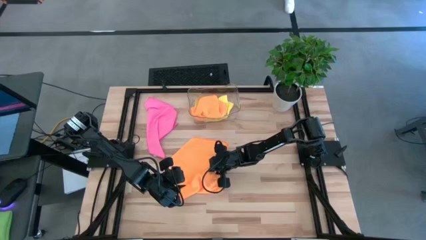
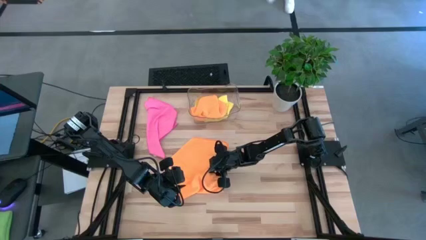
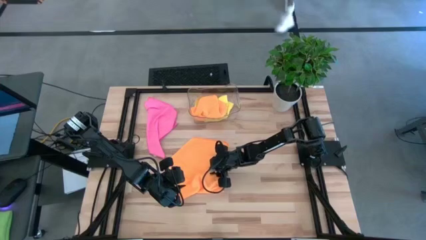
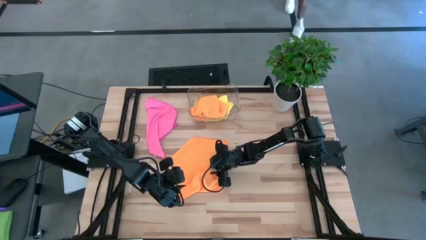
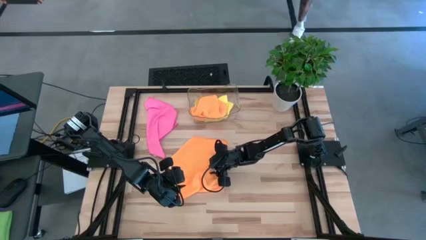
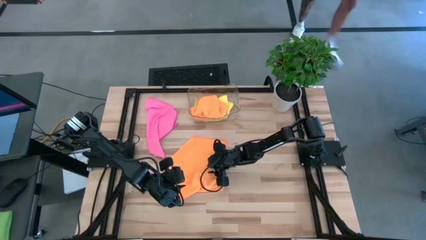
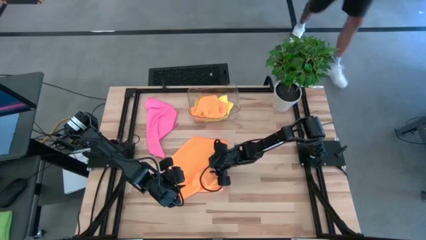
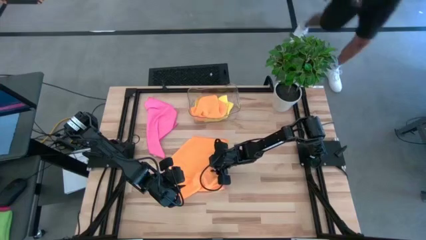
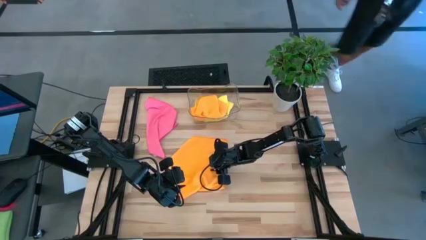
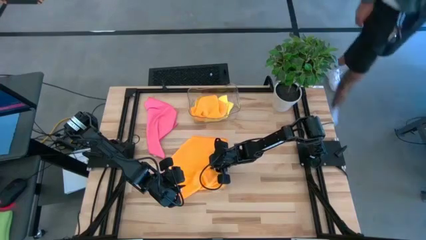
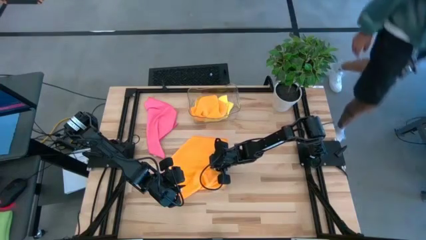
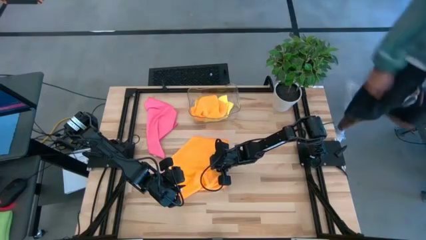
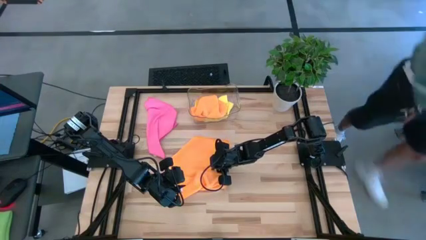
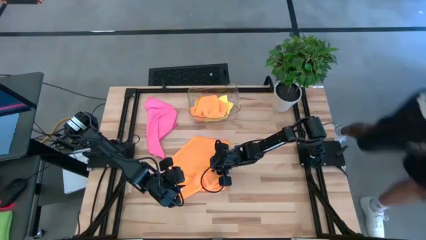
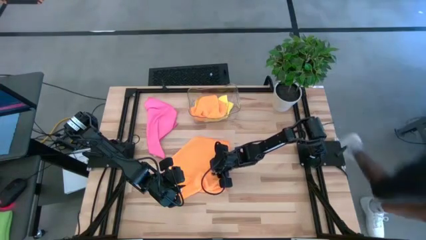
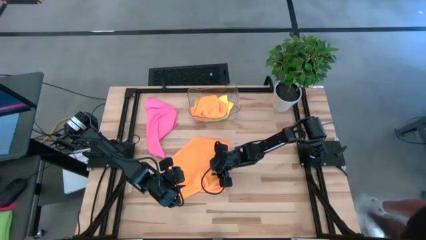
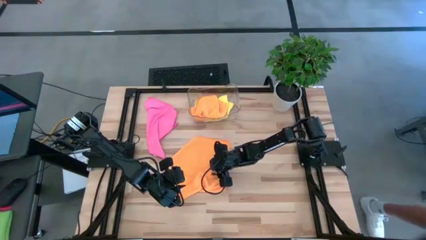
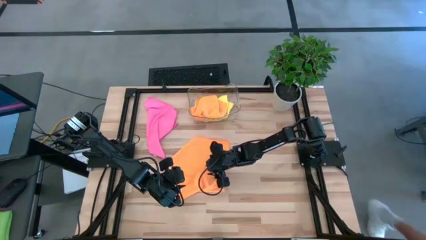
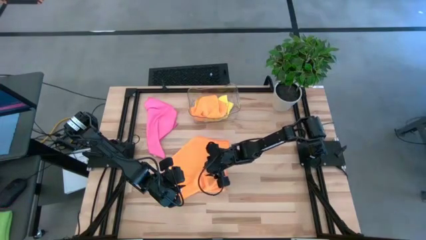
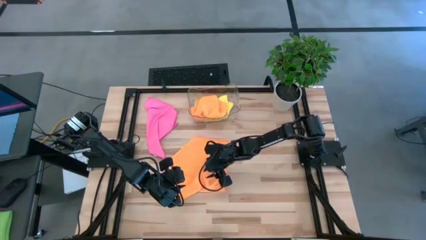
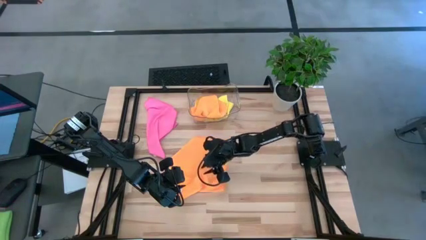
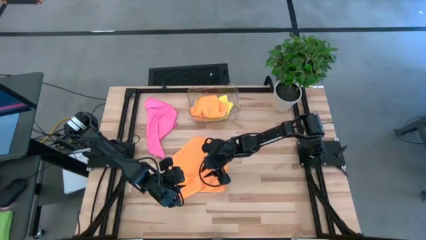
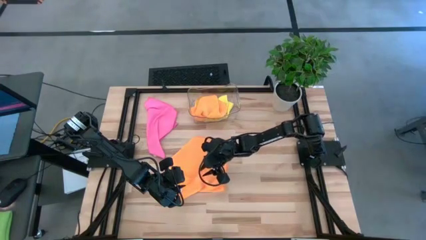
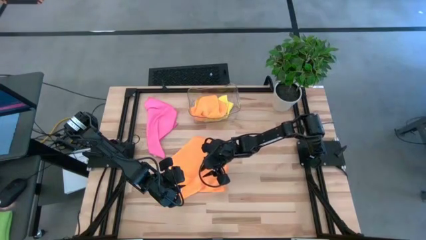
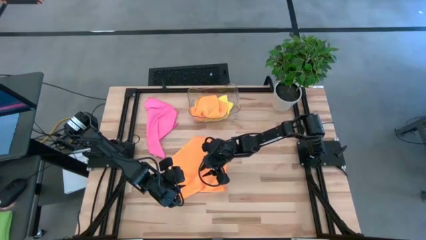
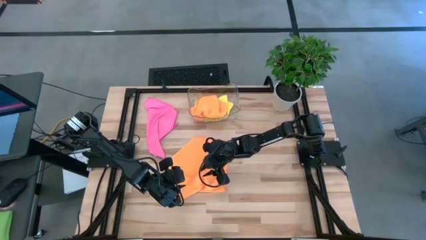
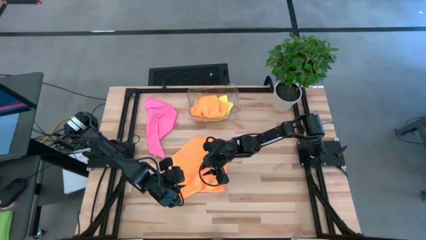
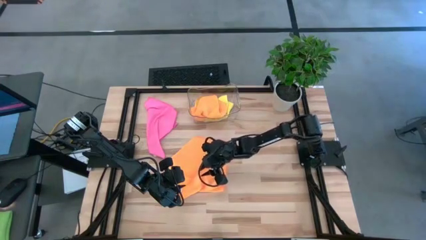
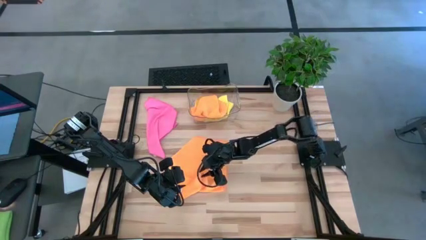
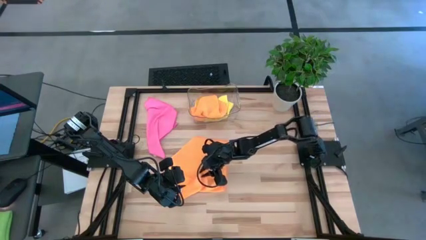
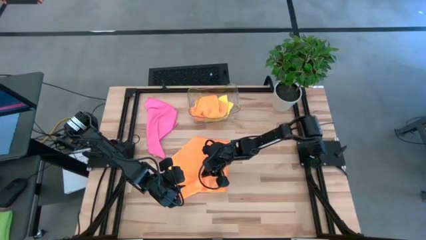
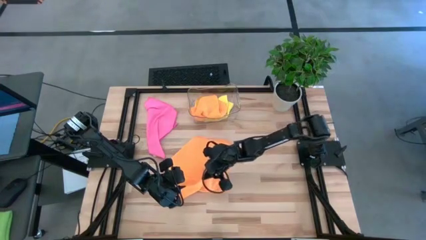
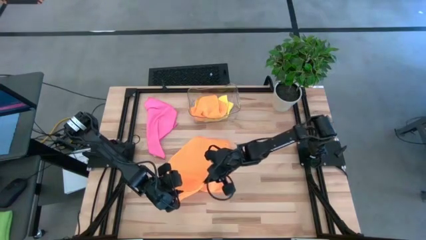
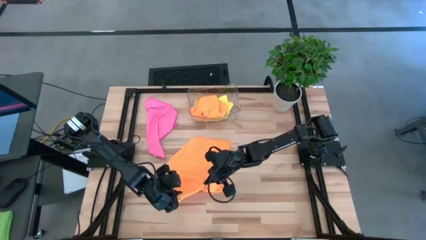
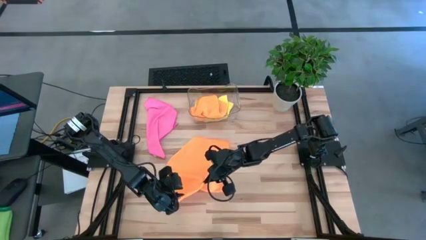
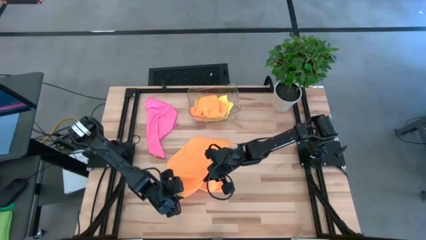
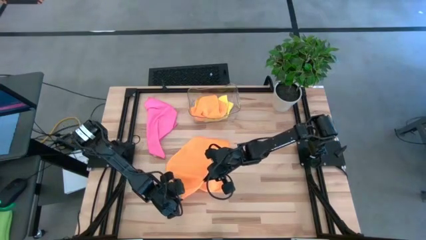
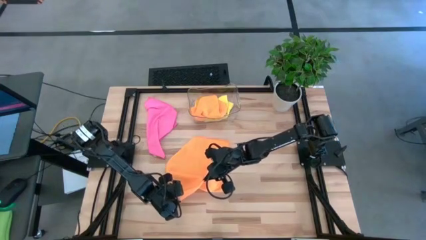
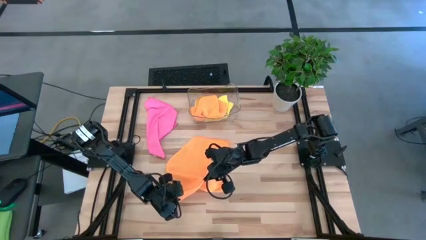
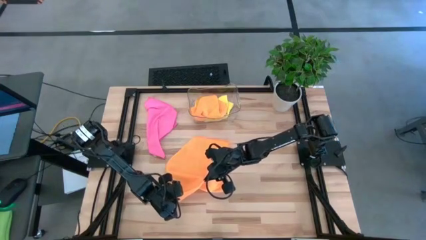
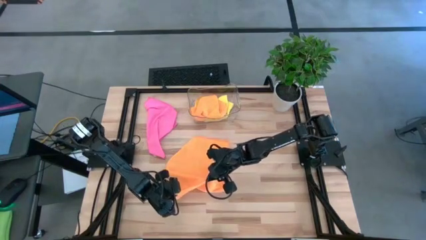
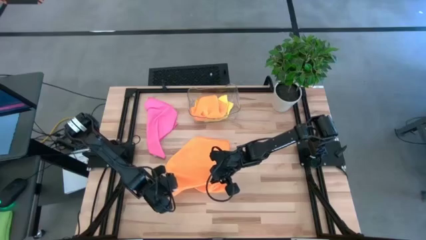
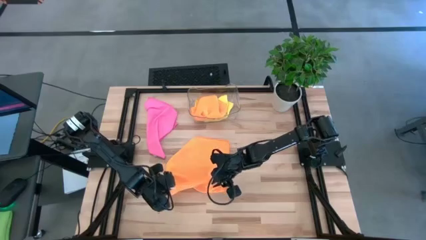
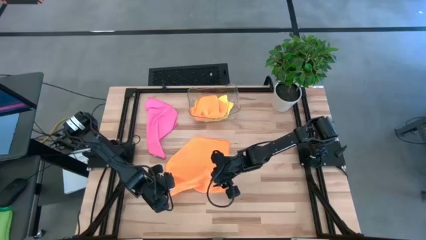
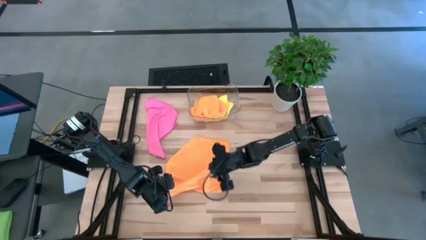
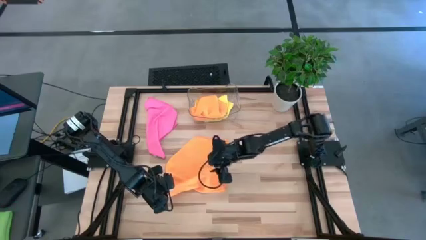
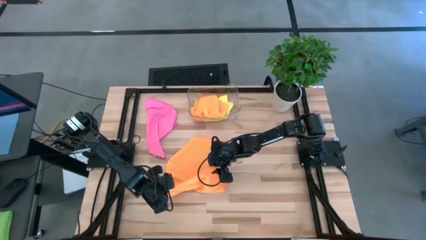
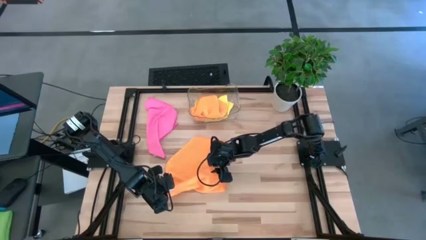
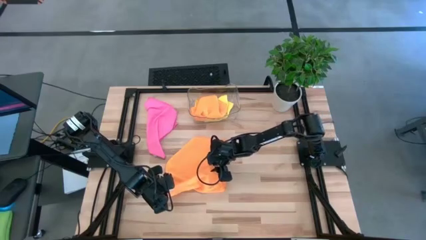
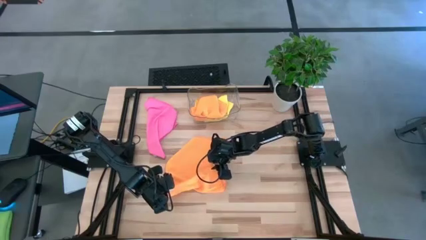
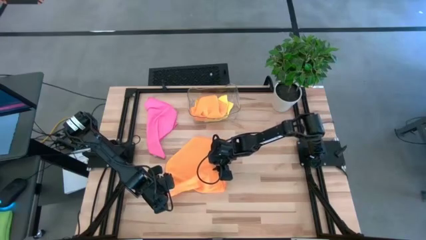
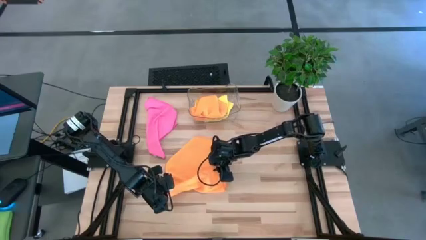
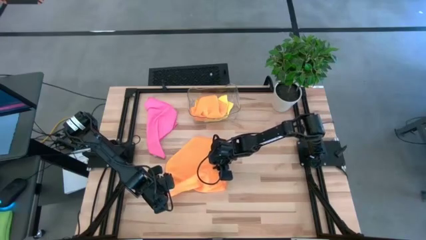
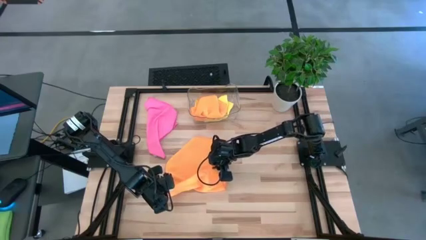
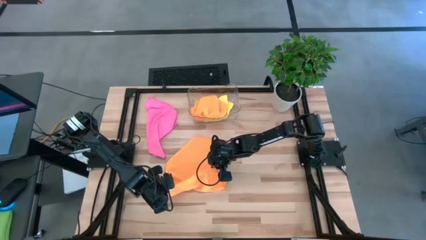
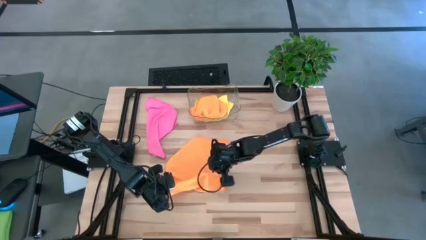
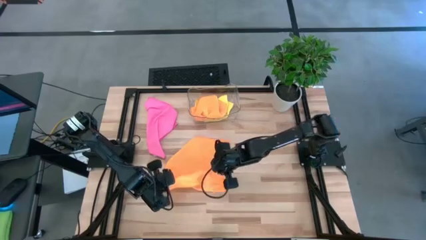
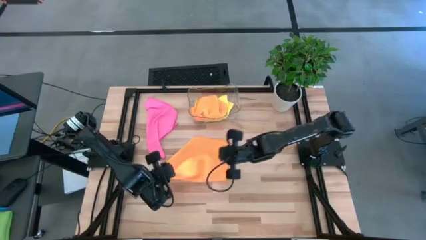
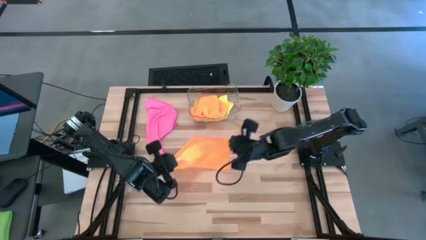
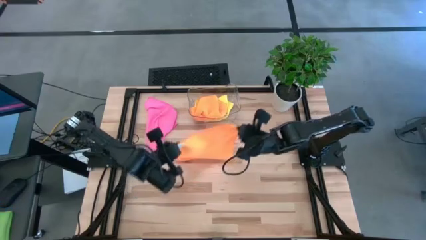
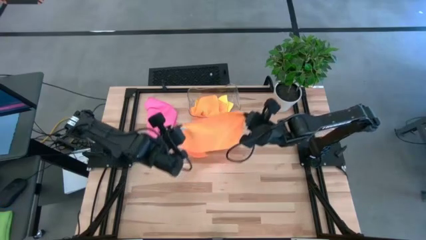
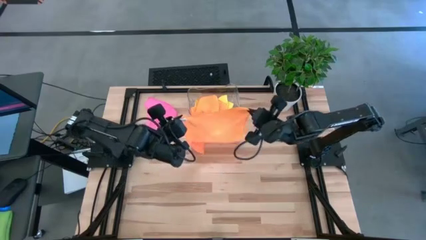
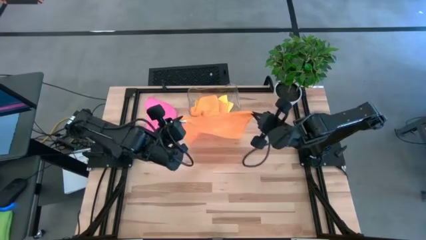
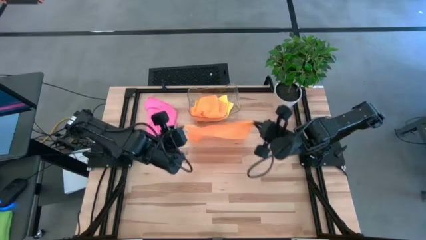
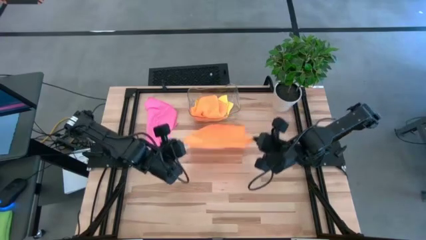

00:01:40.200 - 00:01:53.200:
Task: Fold microfiber towels
Fold the orange towel

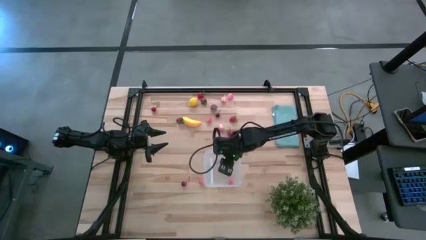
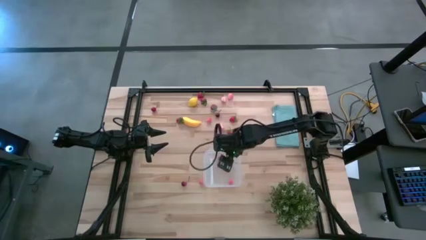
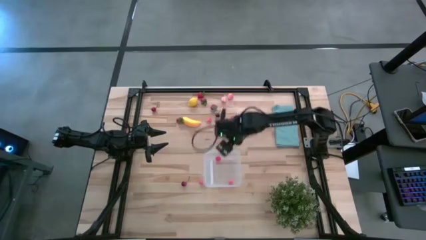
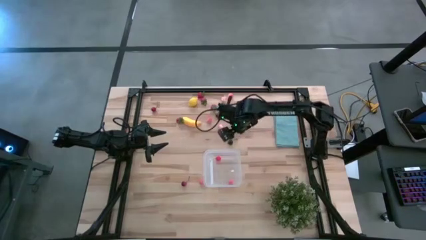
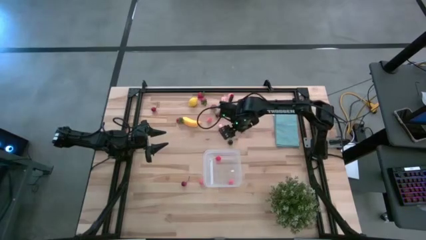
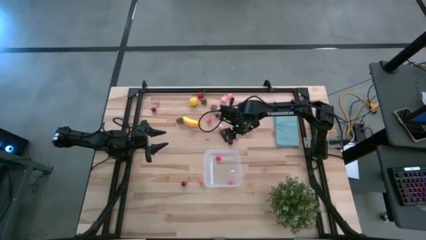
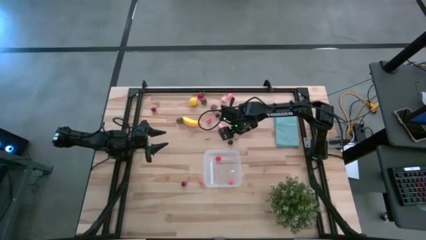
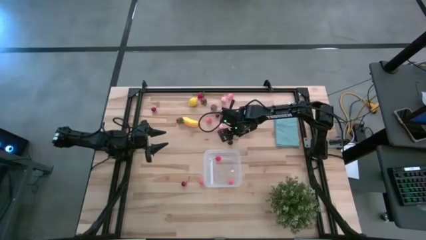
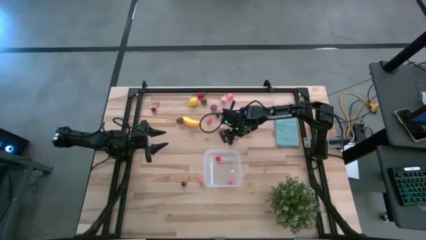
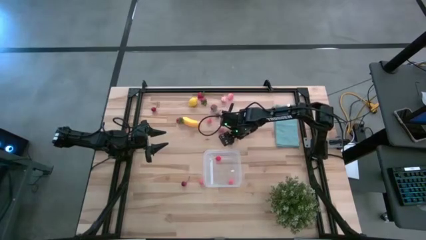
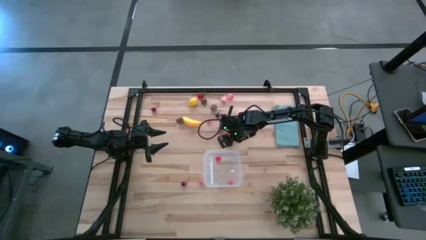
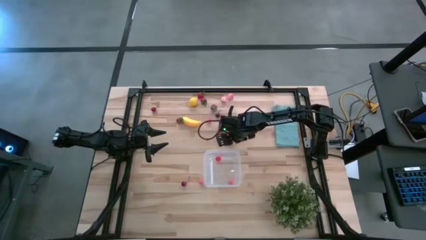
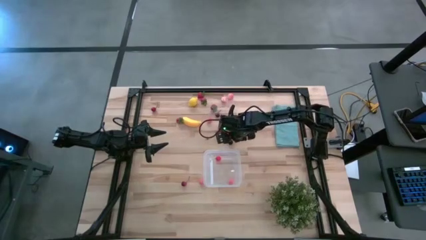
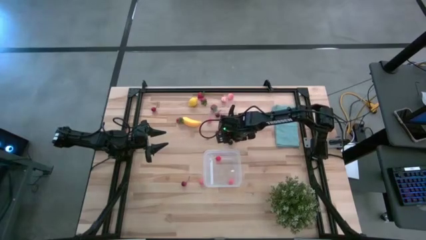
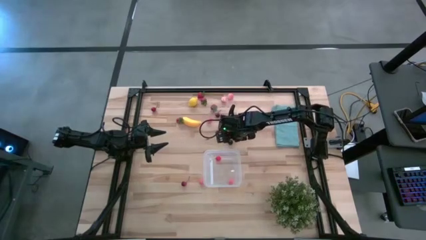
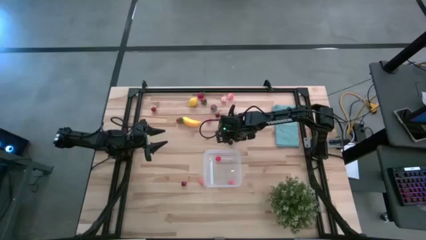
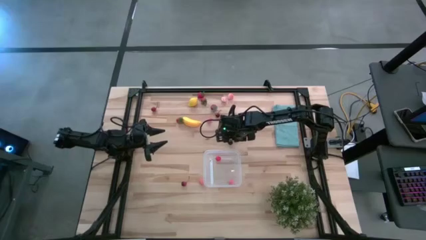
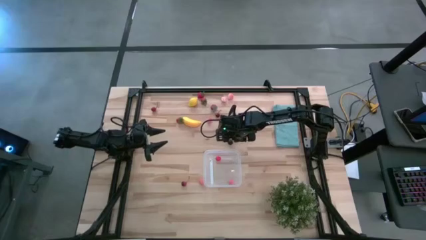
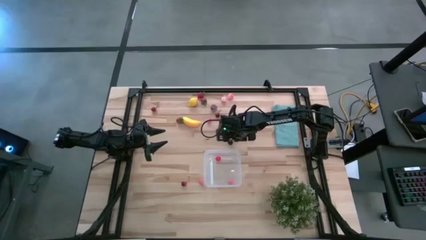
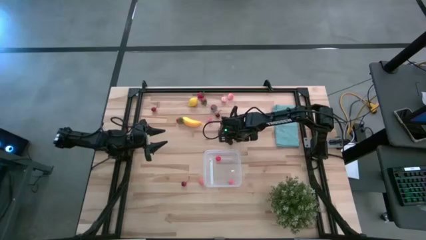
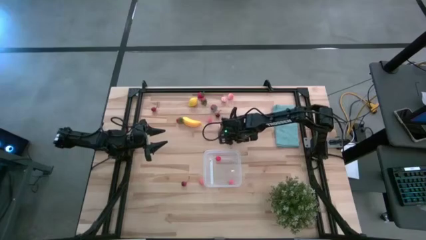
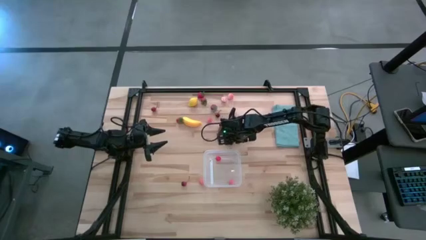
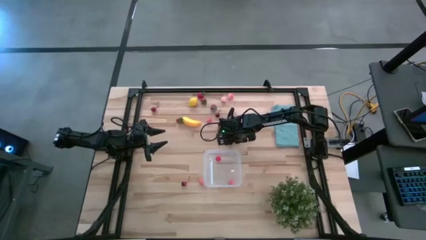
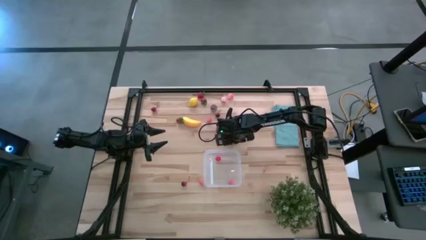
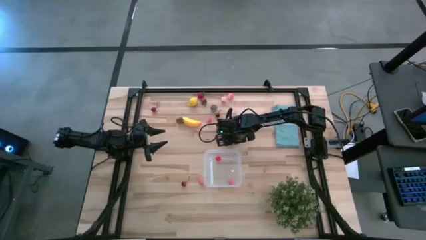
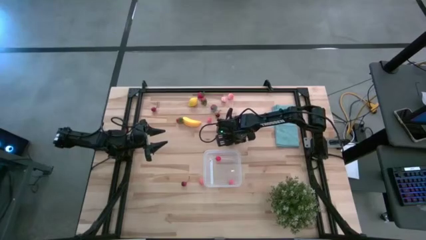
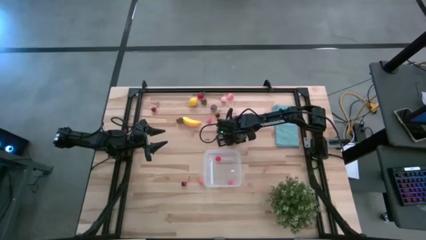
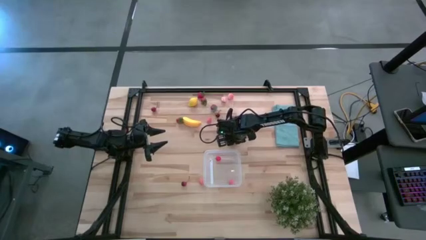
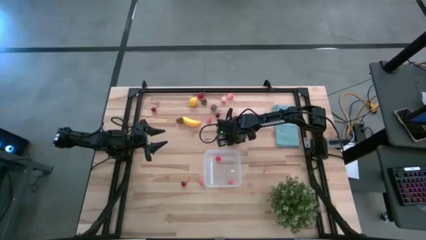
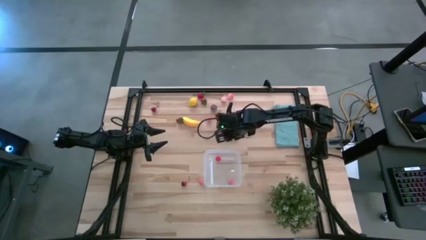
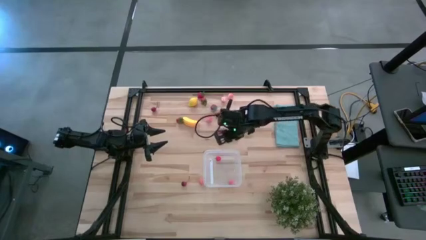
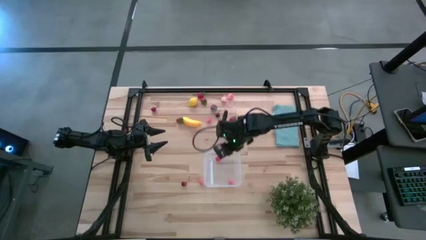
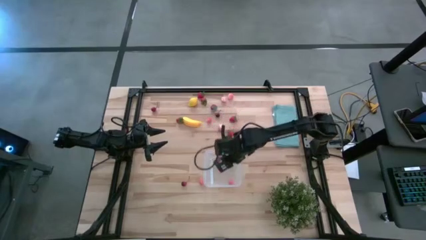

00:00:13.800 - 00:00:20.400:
Task: Pick and placing Produce into tupperware
Put the black cherry into the transparent bin
